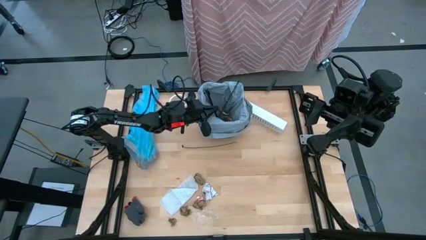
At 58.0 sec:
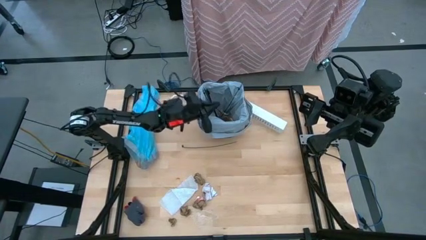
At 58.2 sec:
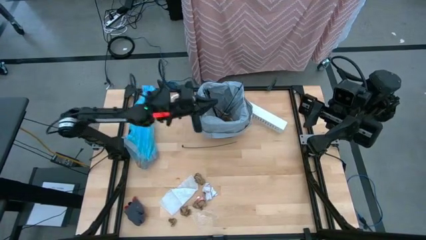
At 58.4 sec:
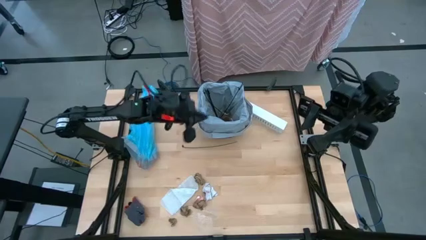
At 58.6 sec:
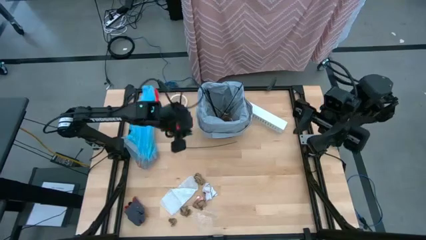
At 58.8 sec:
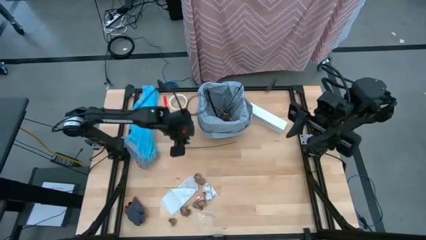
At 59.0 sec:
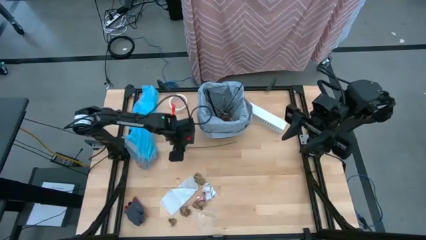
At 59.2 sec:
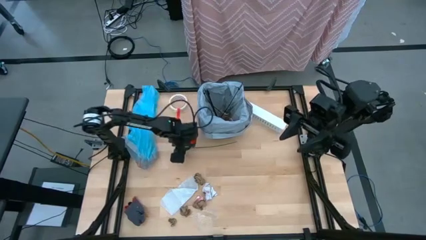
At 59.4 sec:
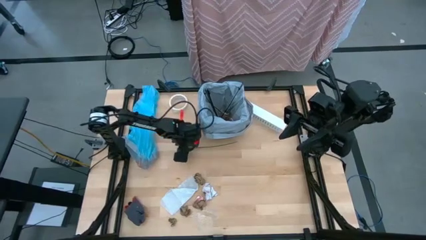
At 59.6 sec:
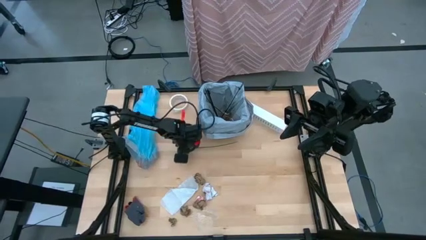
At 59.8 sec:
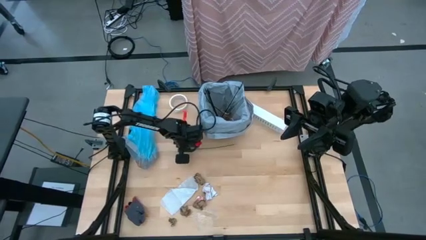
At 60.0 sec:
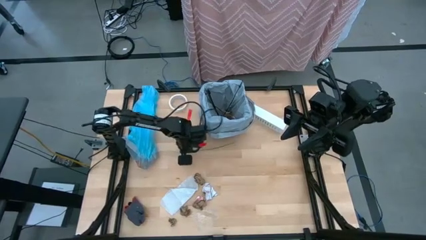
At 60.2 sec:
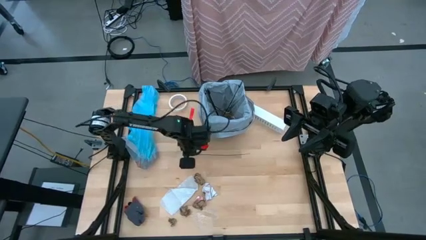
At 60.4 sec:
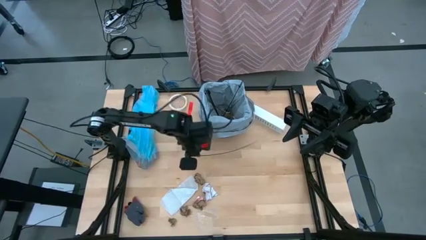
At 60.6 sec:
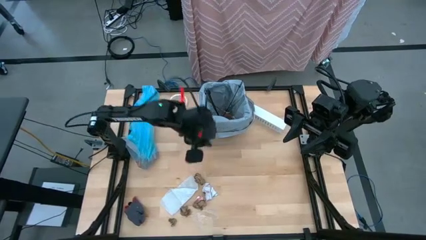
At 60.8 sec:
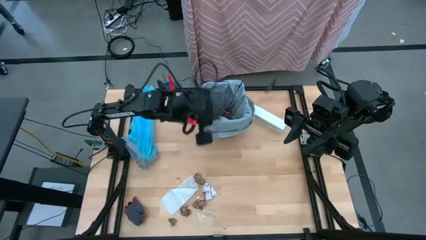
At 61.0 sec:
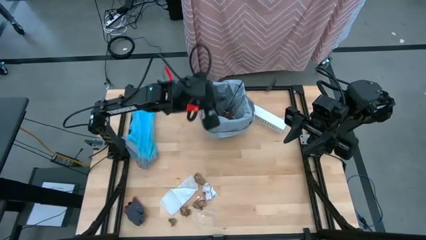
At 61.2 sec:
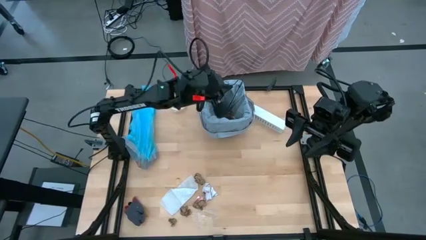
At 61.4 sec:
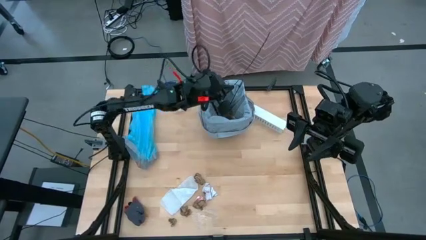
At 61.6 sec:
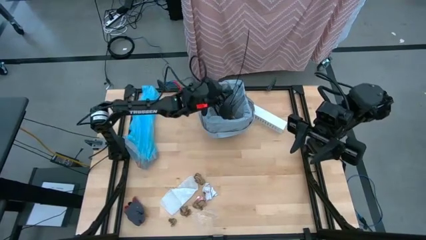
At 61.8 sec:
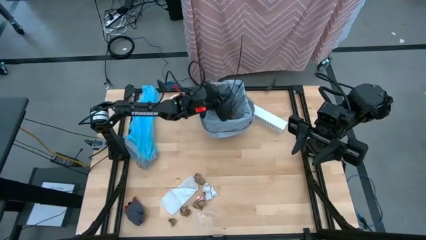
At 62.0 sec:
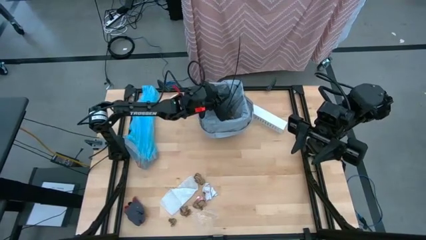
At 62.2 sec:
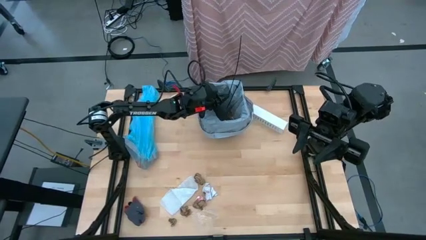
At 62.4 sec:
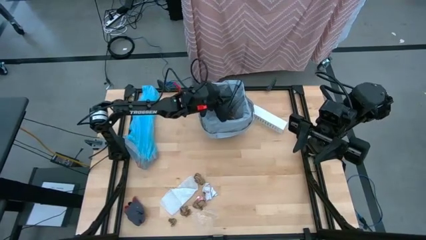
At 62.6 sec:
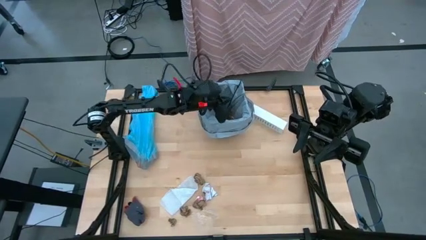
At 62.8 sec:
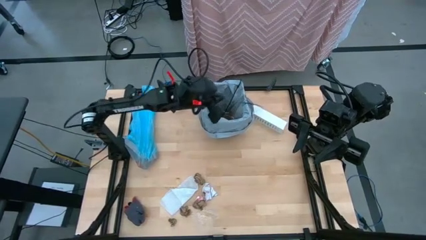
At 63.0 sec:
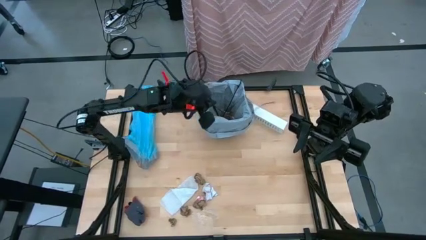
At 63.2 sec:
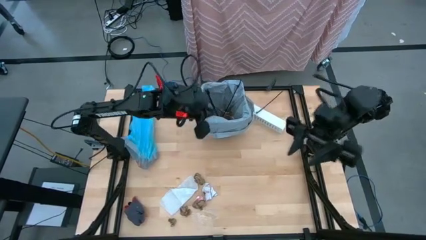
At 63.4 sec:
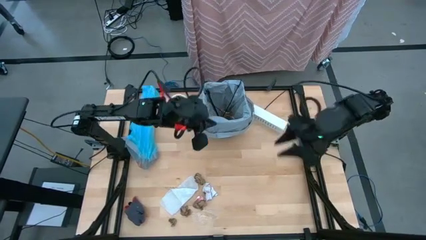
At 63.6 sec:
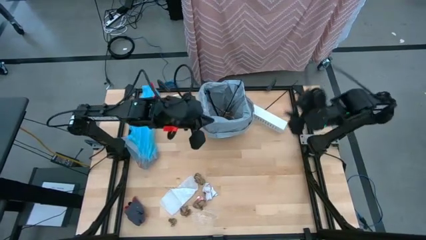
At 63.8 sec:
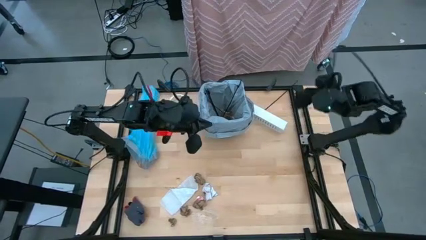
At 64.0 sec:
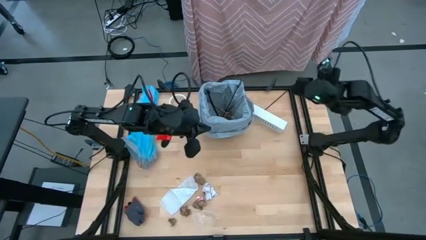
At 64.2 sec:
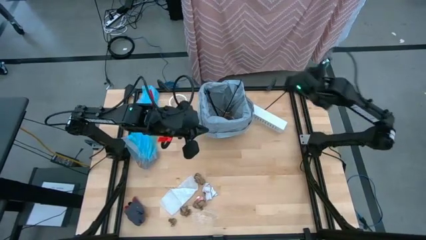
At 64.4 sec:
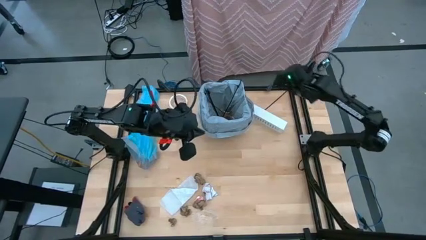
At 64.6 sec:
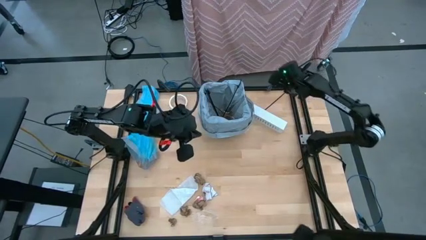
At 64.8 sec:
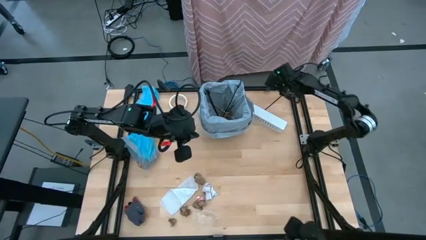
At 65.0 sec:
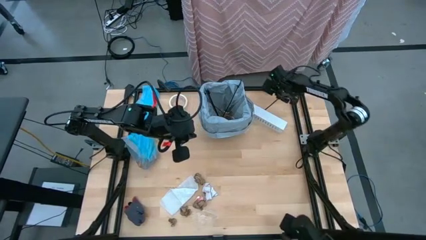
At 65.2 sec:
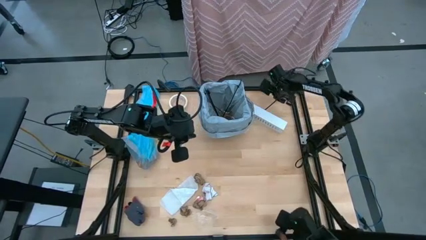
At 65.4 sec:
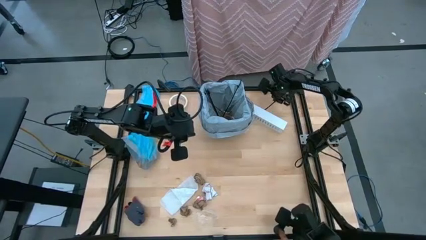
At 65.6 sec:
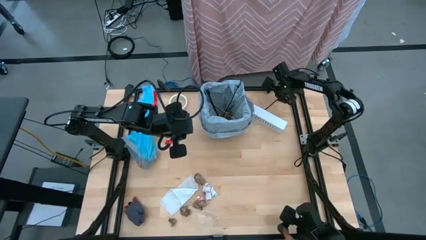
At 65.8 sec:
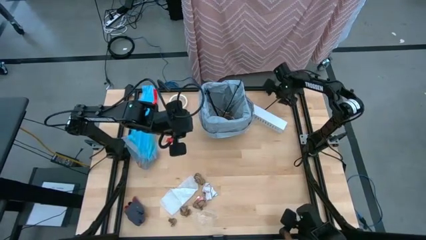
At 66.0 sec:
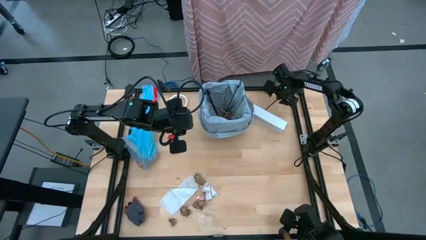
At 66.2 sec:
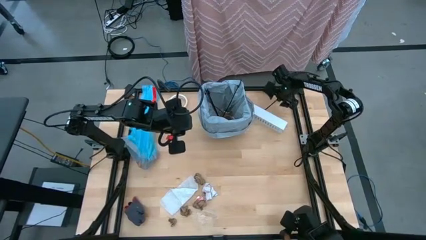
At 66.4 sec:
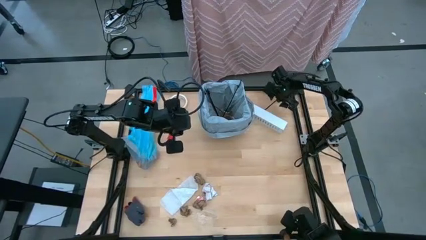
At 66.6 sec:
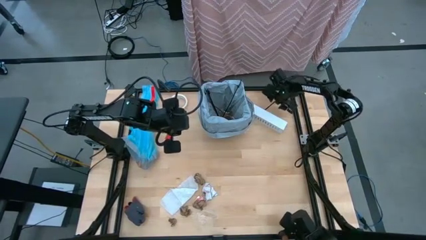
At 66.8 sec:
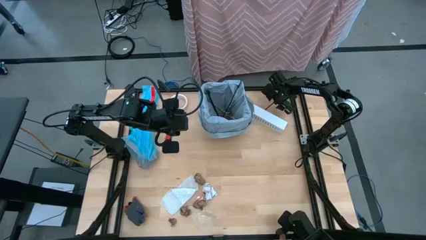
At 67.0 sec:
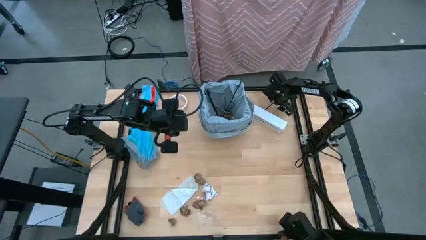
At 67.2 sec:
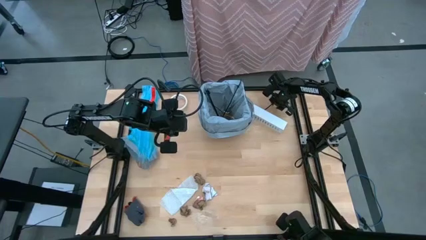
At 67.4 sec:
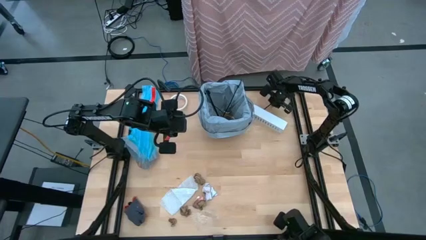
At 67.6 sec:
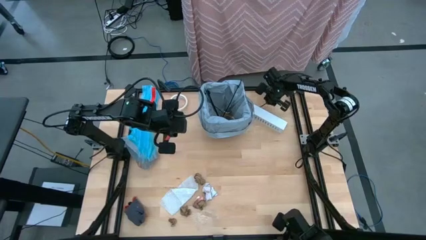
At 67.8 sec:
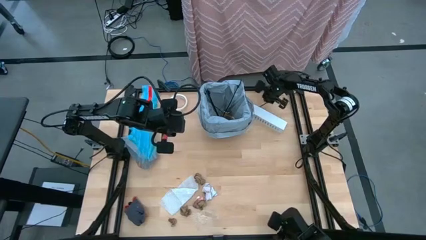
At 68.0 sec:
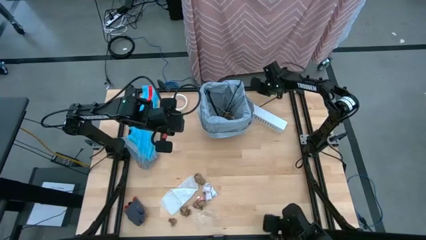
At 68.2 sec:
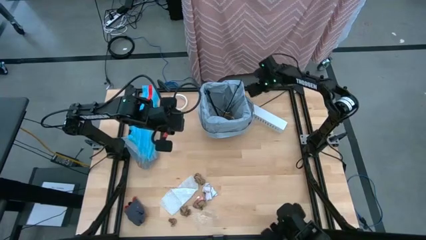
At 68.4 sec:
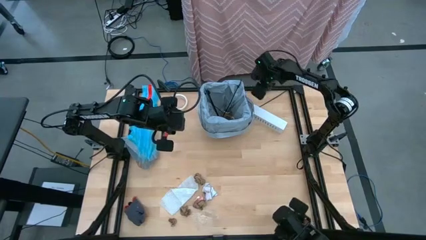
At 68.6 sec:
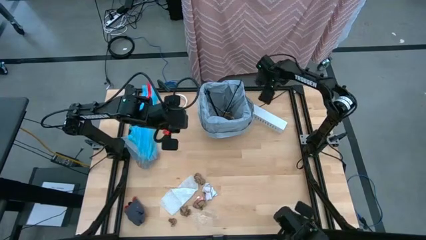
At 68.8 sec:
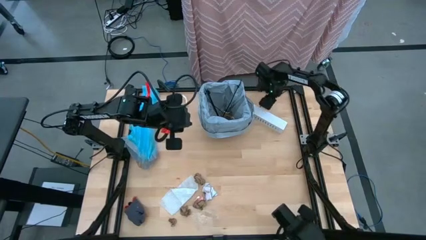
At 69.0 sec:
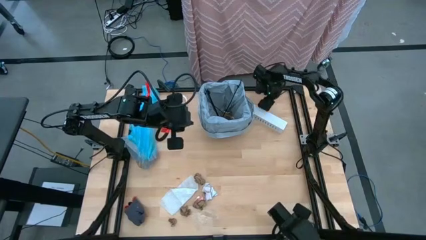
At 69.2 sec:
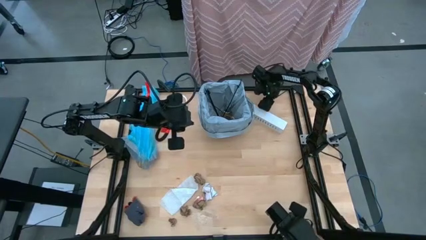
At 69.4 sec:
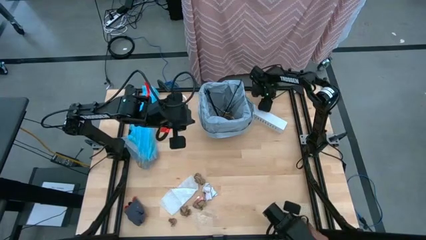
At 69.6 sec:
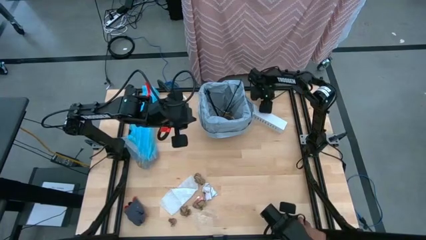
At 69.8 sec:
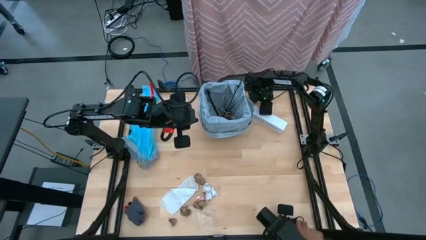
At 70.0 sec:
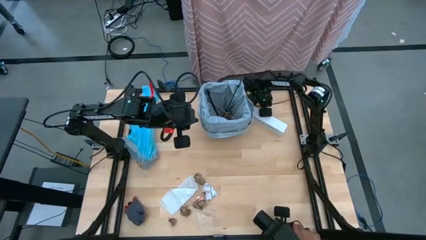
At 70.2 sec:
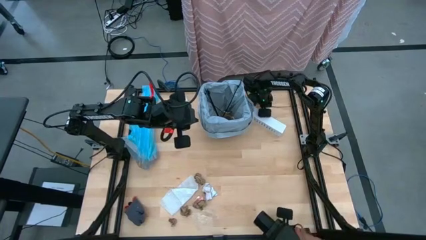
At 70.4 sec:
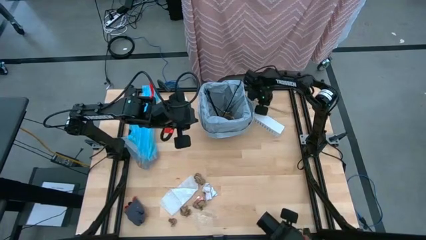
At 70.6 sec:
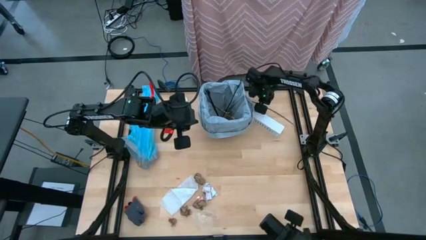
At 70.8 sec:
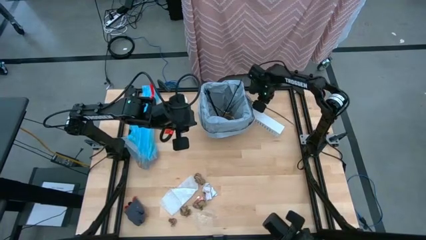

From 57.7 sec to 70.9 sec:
Task: place trash/remove bag and relplace
Put the zip tie into the trash bin

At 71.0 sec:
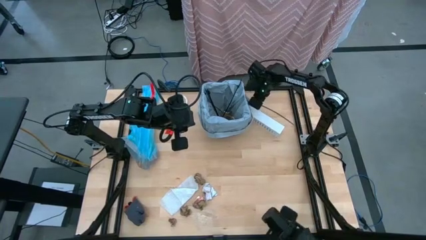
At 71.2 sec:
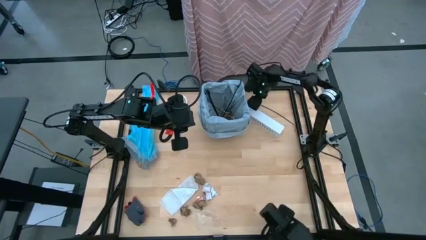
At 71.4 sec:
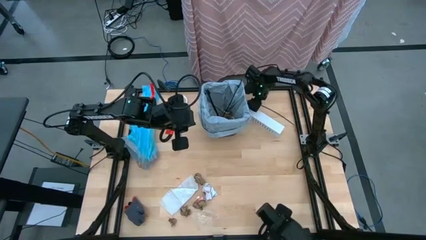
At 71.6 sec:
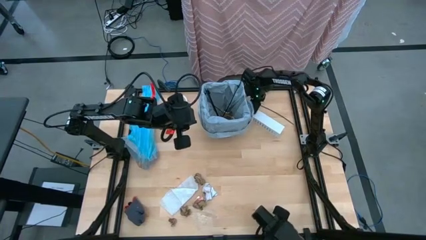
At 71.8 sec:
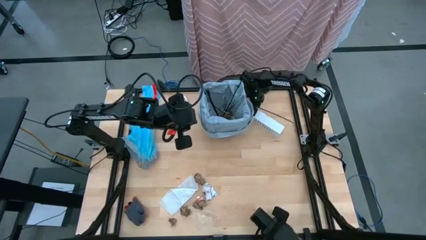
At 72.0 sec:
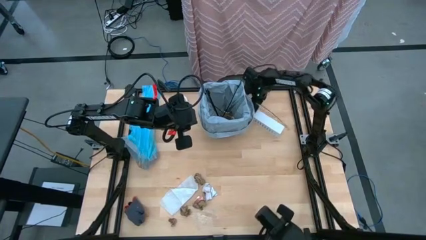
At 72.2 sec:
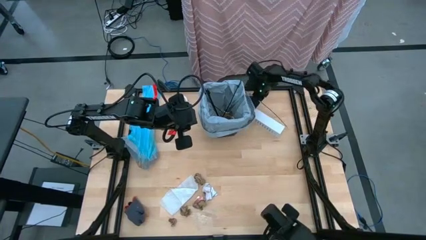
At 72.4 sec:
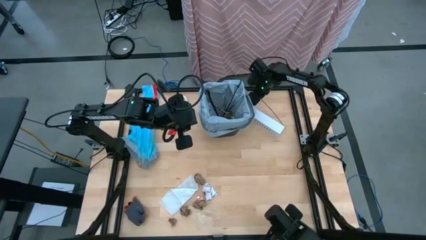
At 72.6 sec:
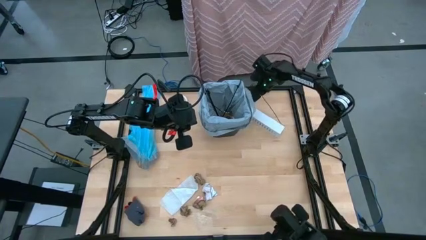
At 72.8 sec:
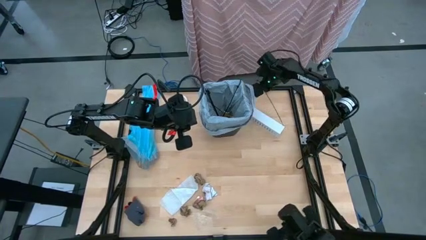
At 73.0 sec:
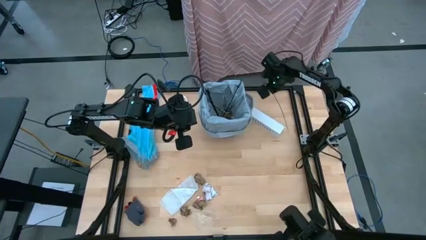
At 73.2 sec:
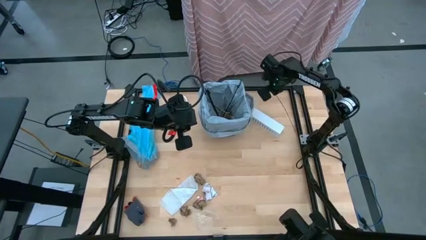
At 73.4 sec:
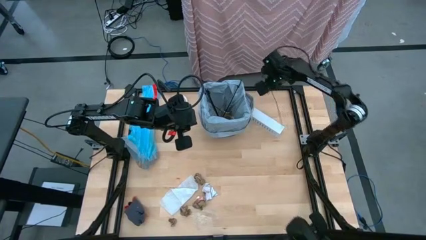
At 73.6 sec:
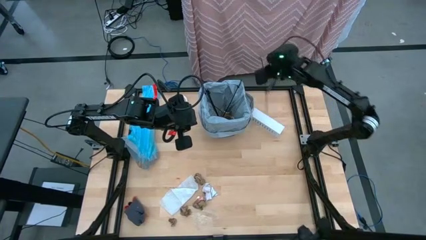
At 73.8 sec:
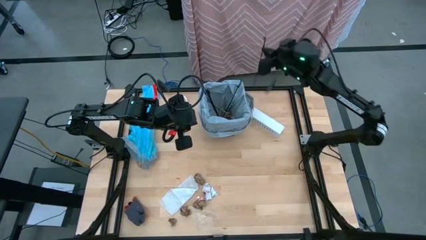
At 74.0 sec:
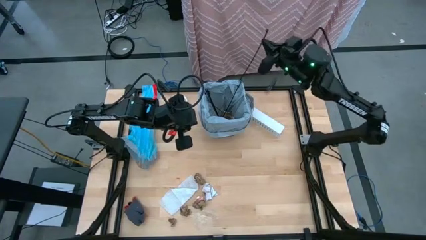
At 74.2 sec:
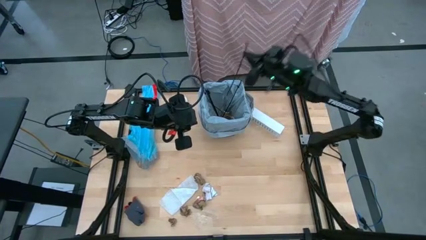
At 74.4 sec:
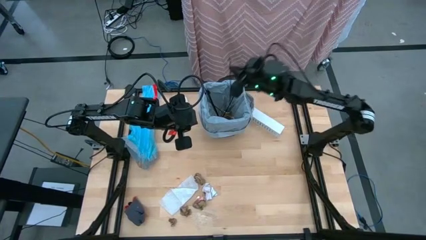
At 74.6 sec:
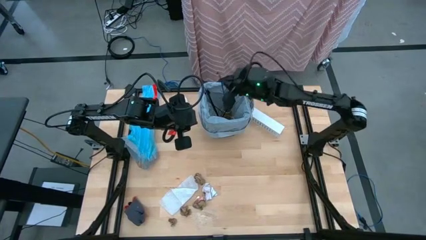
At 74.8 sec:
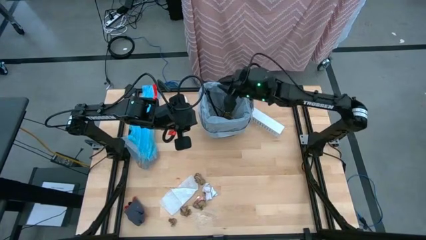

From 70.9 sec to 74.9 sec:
Put the zip tie into the trash bin
